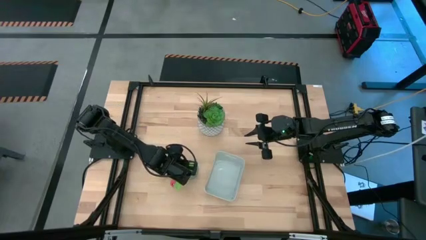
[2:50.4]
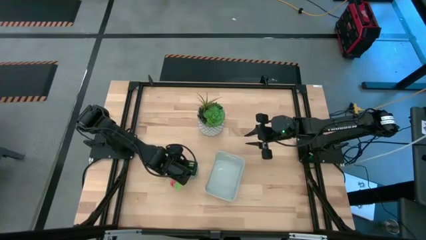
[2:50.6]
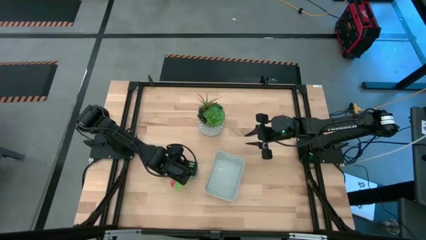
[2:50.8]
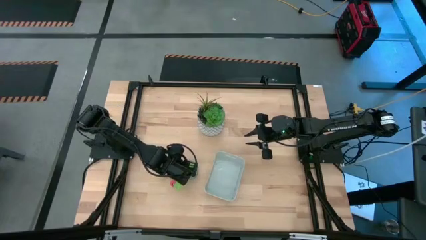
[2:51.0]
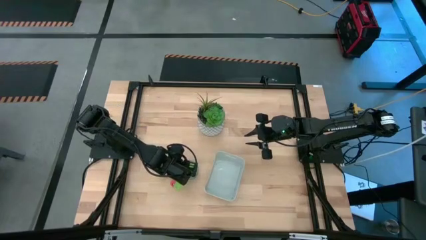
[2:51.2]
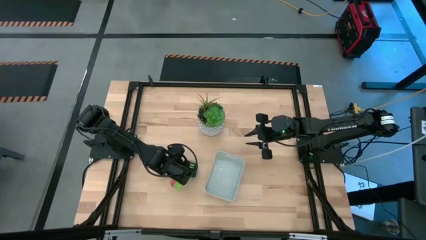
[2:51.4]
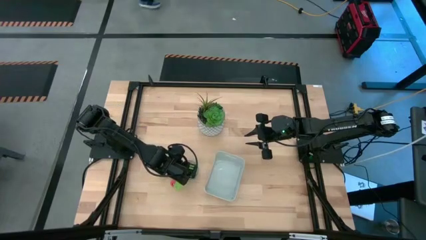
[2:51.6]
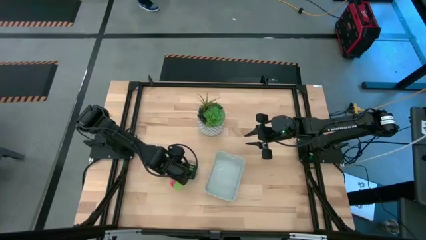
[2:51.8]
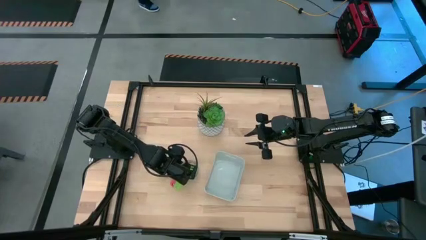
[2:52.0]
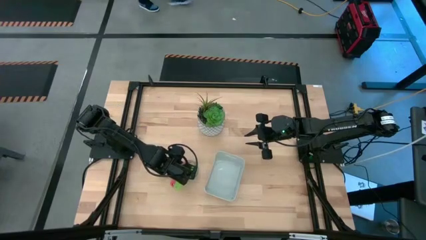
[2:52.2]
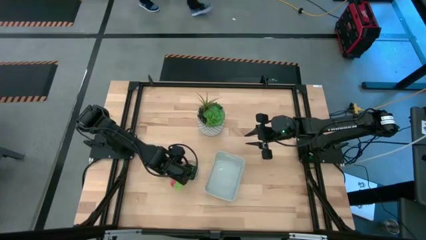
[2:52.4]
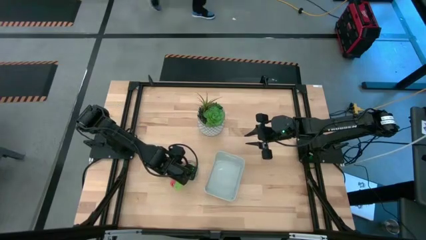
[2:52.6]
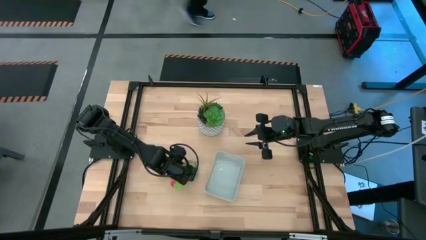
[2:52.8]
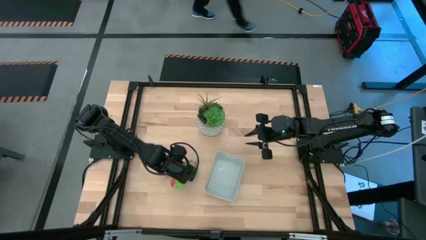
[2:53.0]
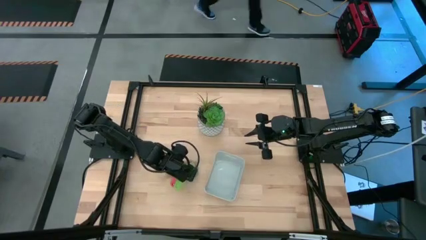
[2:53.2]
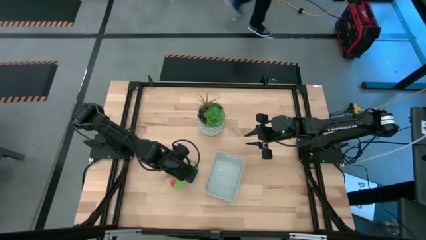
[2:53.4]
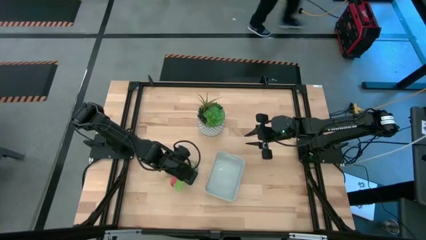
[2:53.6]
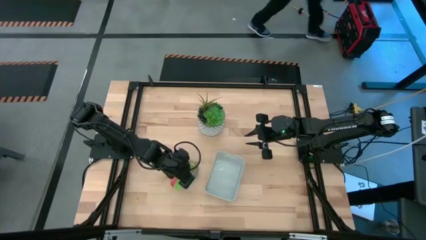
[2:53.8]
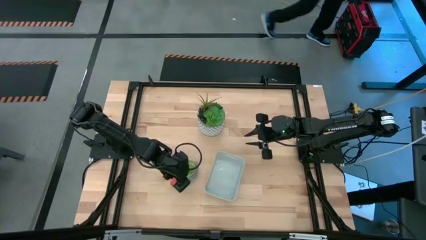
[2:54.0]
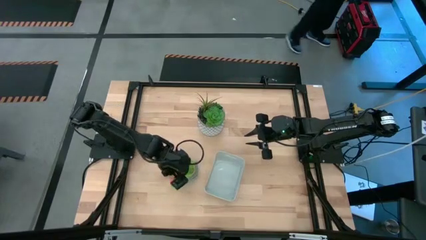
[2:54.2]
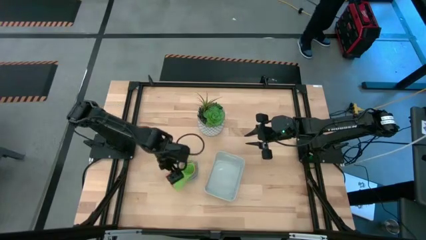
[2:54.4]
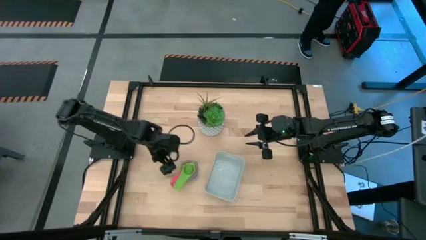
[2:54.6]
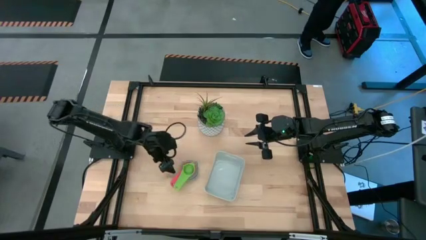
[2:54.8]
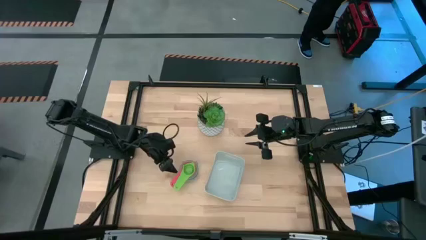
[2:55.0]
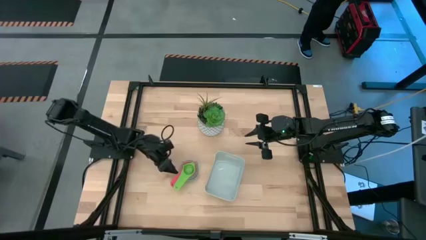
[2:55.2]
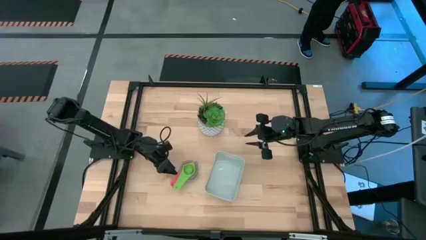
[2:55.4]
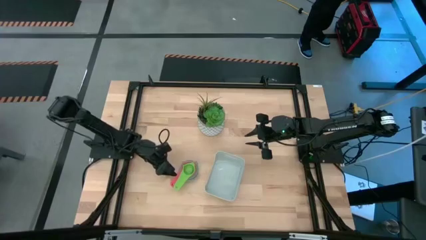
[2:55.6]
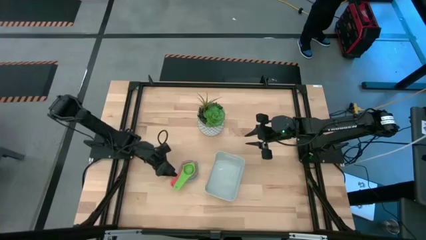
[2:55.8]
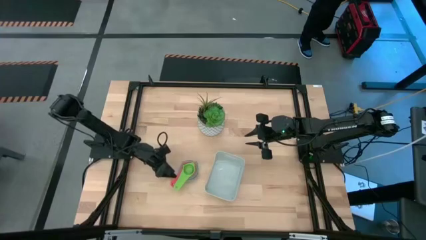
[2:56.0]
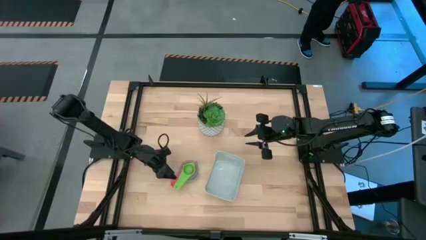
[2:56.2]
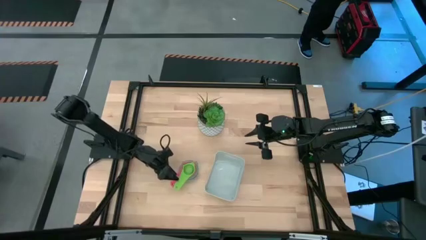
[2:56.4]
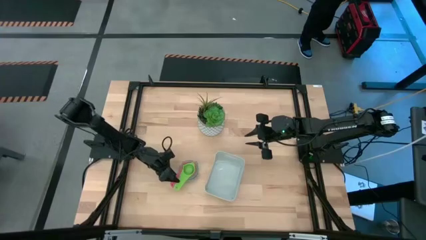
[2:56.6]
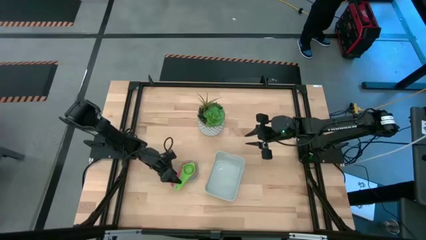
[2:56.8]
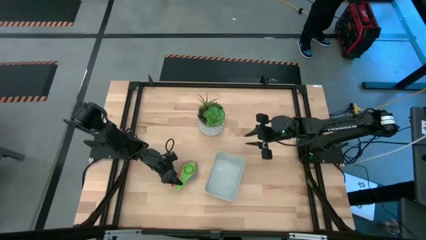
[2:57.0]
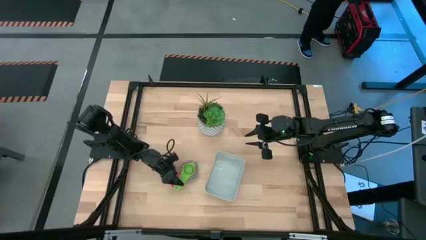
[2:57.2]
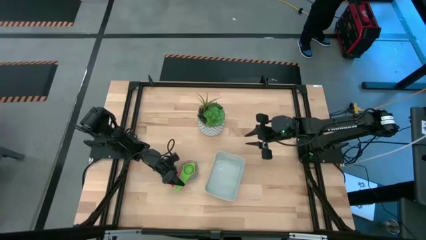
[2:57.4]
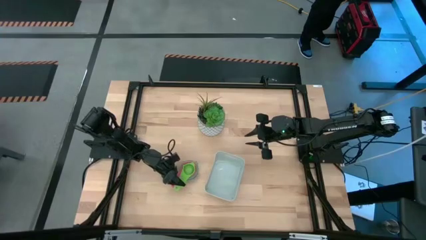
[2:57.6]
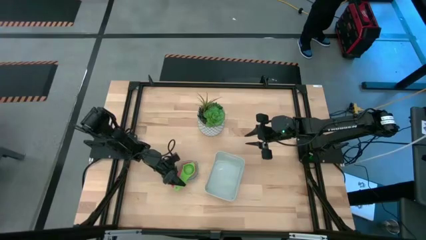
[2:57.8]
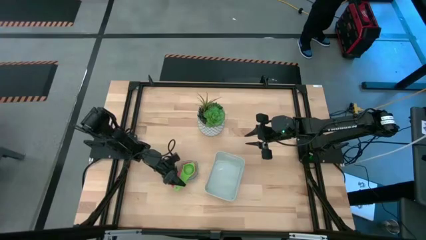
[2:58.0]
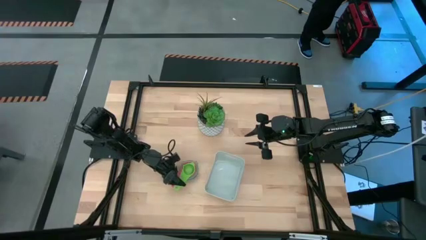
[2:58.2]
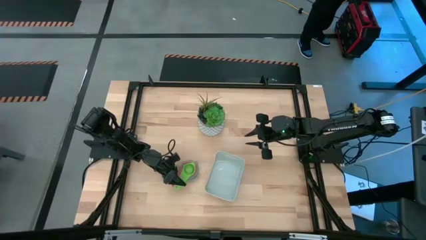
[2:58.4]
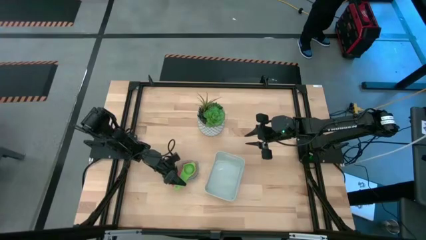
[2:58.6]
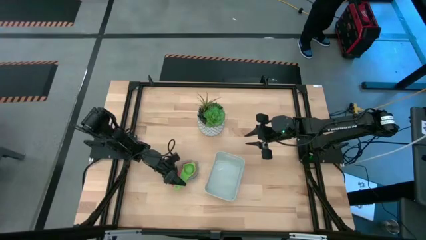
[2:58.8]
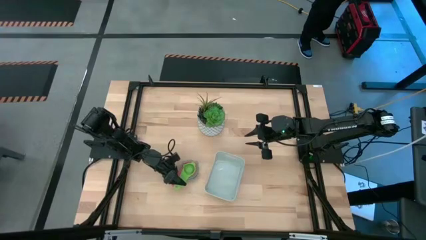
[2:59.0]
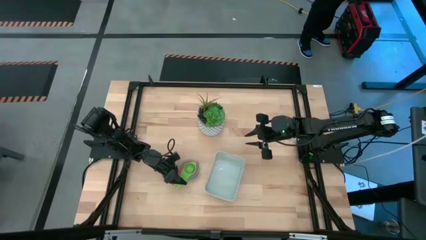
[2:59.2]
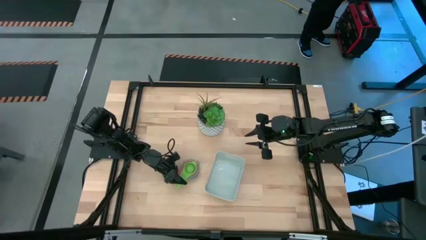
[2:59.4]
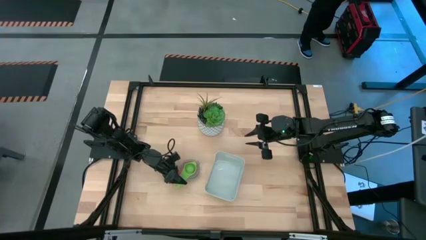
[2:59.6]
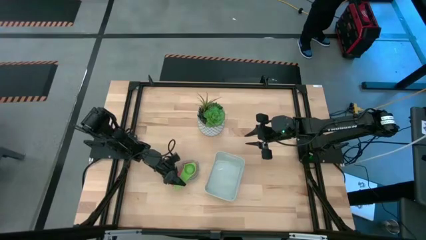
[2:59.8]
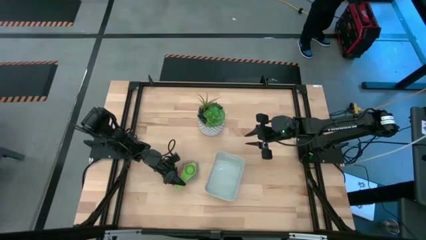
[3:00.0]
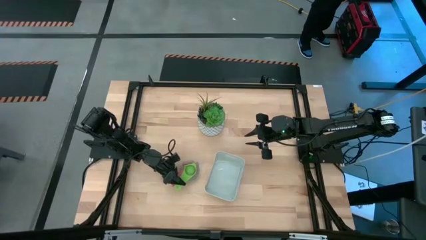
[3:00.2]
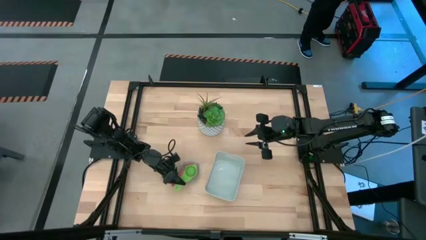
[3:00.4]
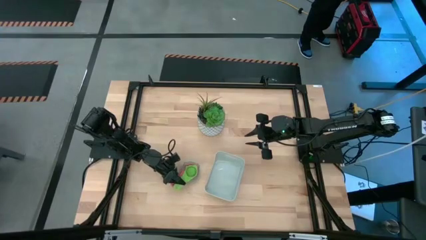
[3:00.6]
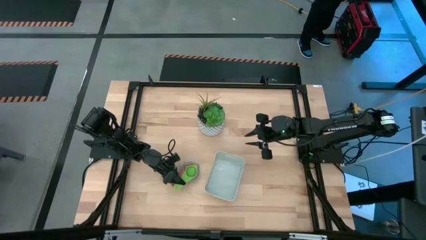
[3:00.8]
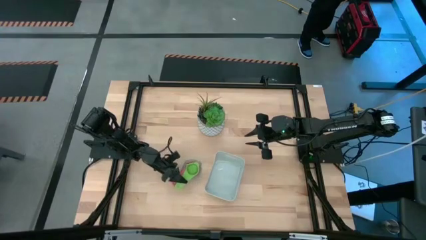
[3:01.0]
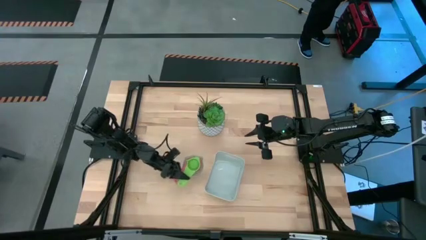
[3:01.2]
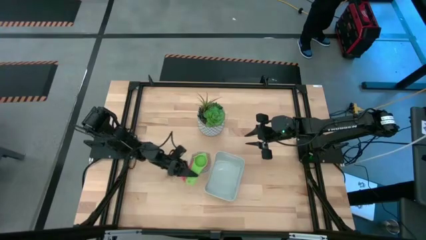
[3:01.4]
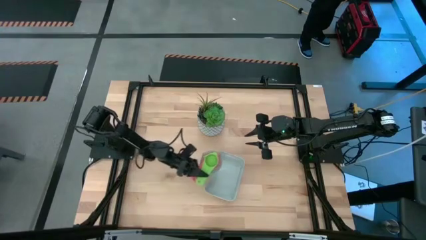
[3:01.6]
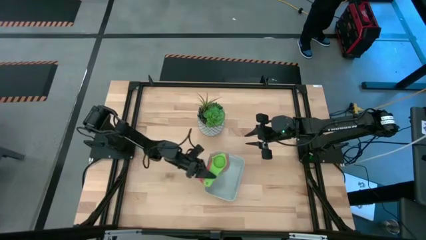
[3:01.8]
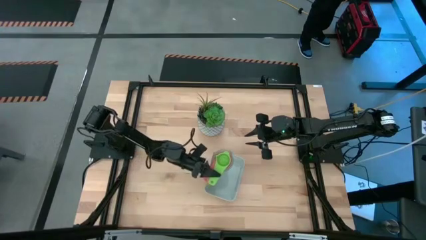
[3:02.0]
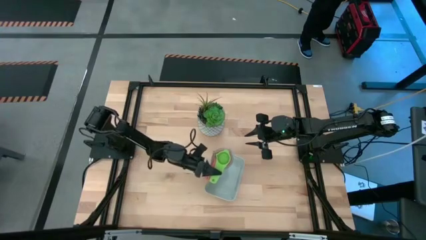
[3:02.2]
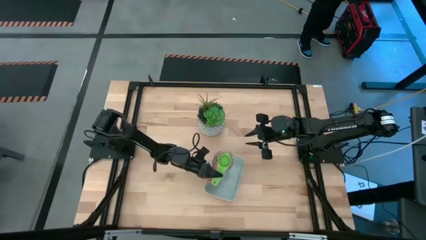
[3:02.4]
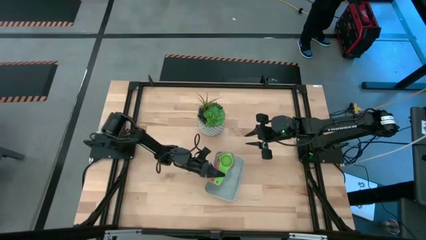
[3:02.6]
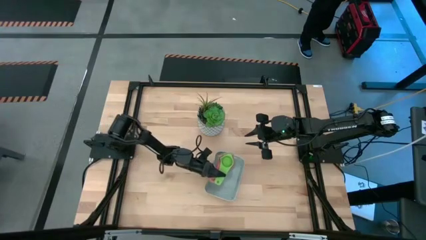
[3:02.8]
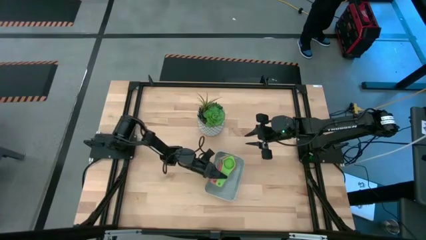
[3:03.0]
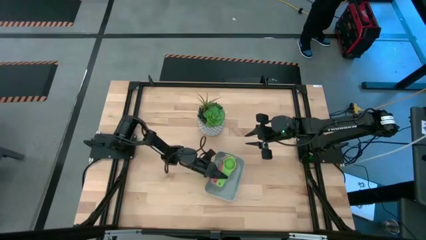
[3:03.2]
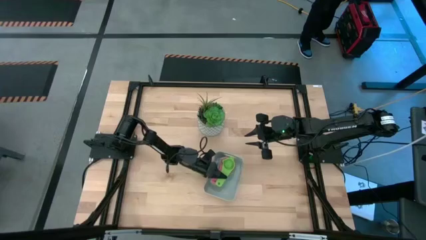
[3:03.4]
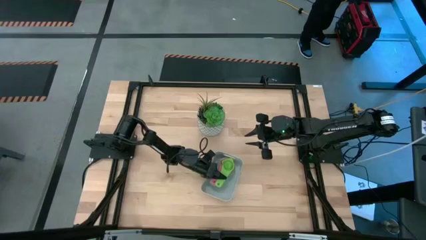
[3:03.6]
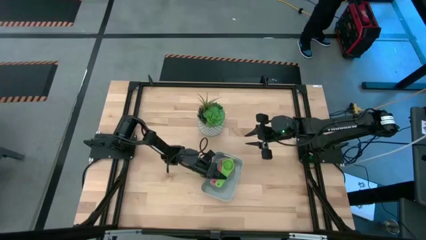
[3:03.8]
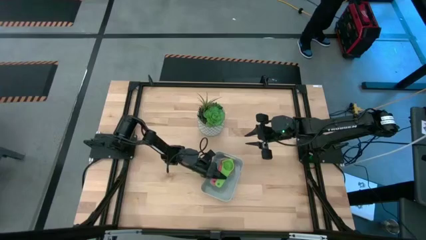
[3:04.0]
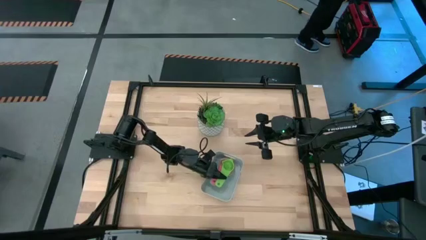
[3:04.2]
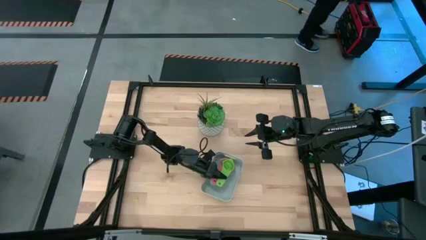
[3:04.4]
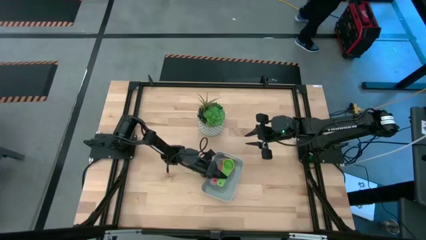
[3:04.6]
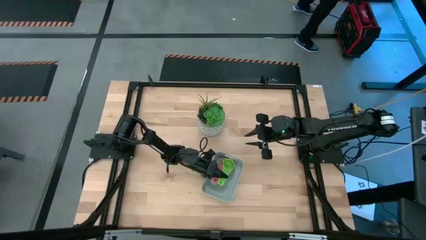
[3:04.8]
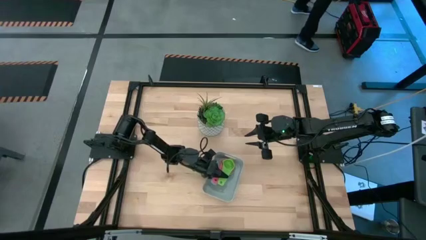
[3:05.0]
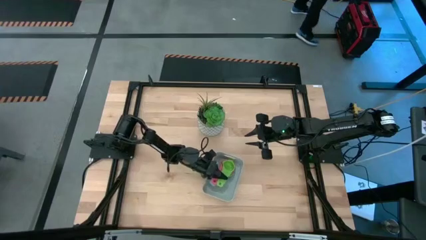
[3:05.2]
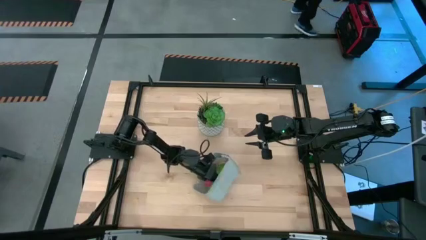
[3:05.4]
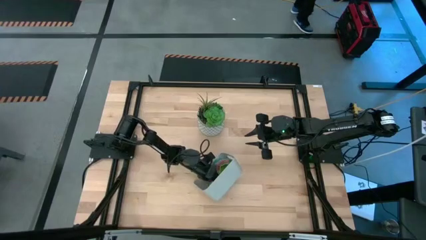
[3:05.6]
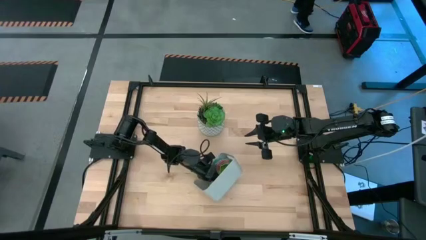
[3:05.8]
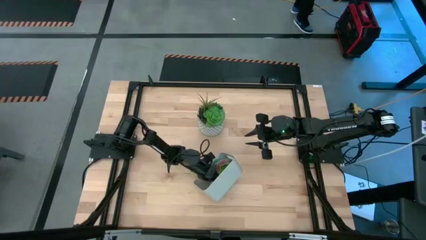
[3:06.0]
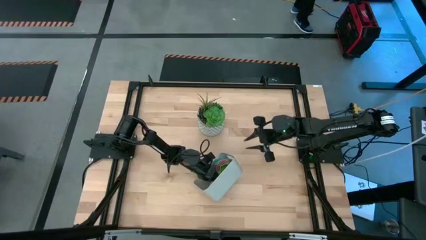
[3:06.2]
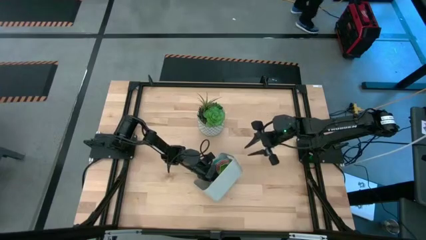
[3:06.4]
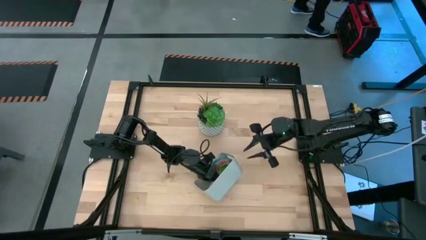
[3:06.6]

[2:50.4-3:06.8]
Task: Nest measuring cups in basket
Put the stacked measuring cups into the bin
